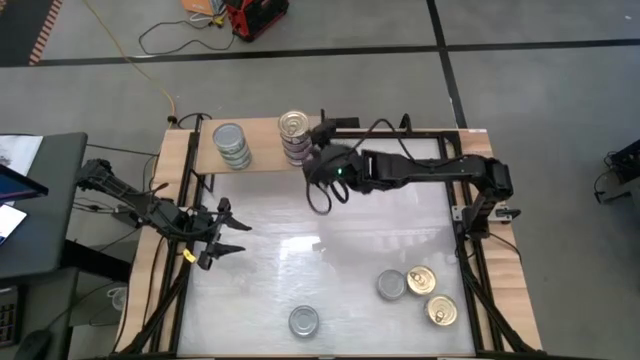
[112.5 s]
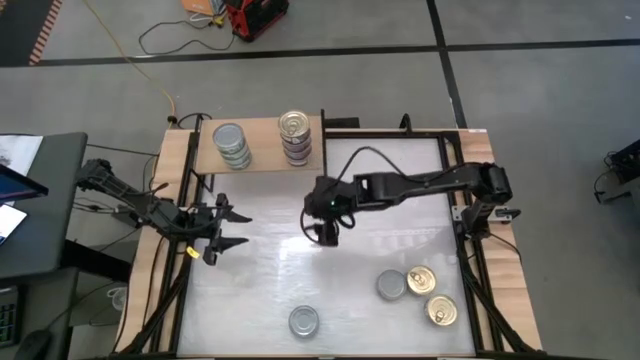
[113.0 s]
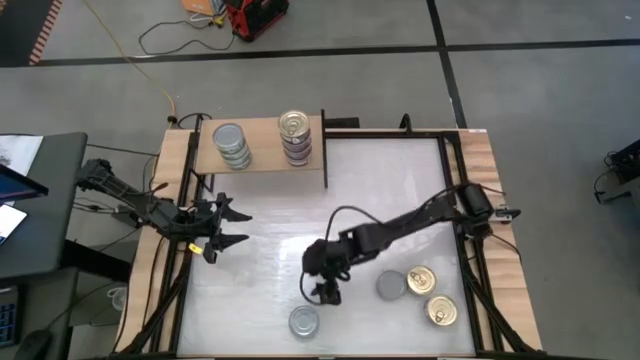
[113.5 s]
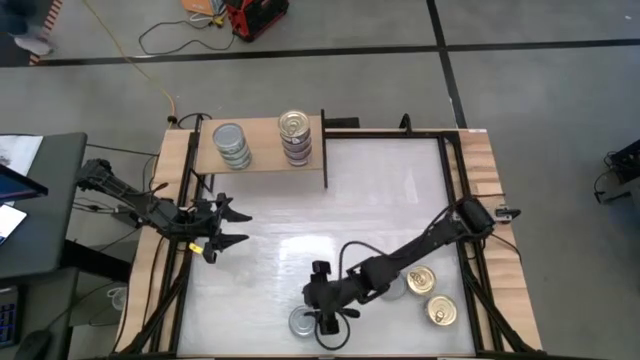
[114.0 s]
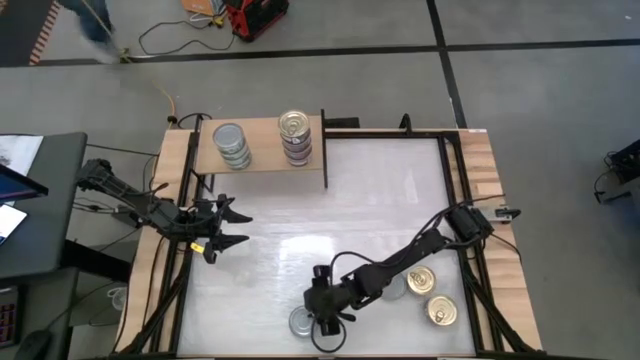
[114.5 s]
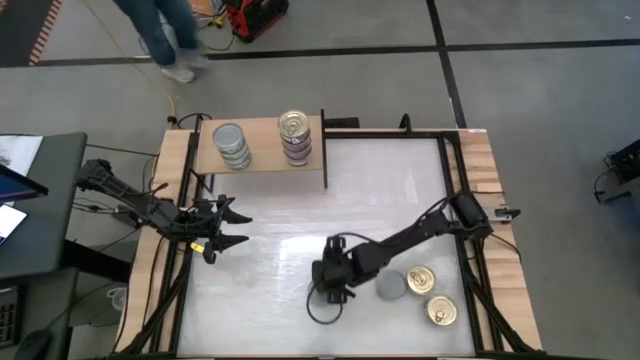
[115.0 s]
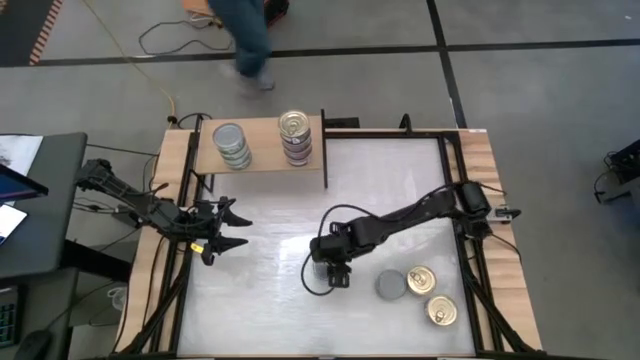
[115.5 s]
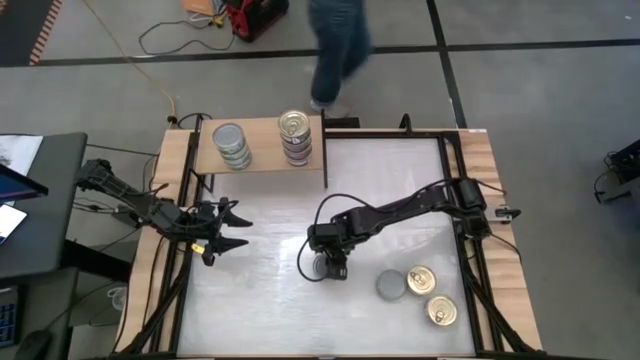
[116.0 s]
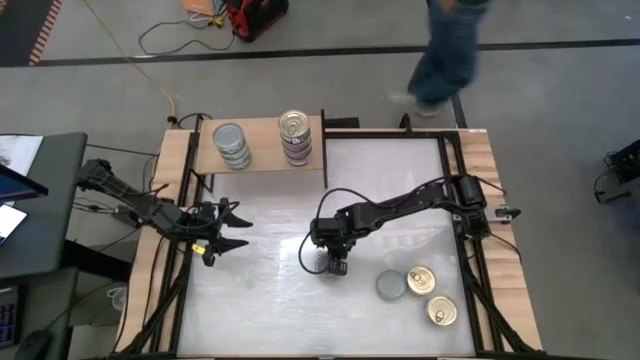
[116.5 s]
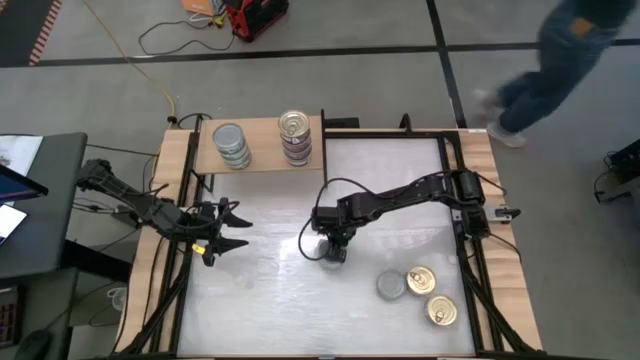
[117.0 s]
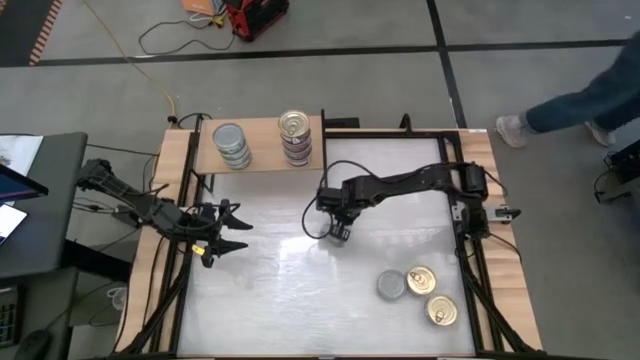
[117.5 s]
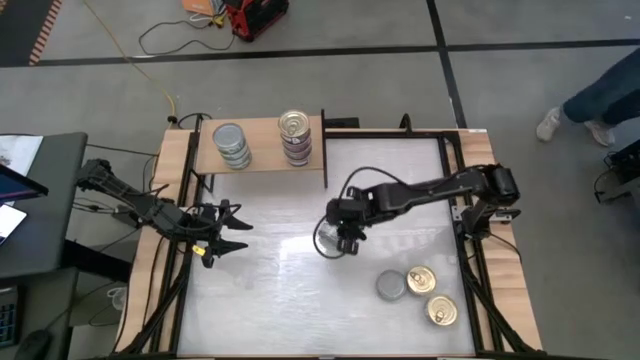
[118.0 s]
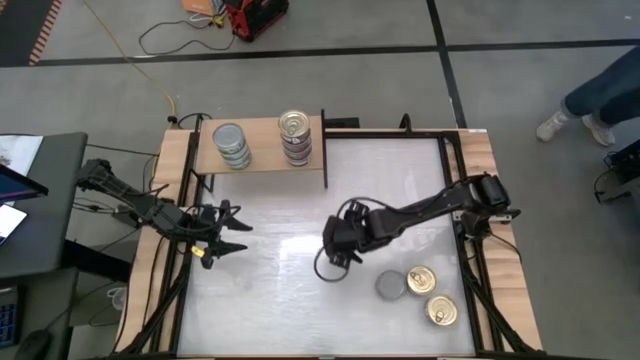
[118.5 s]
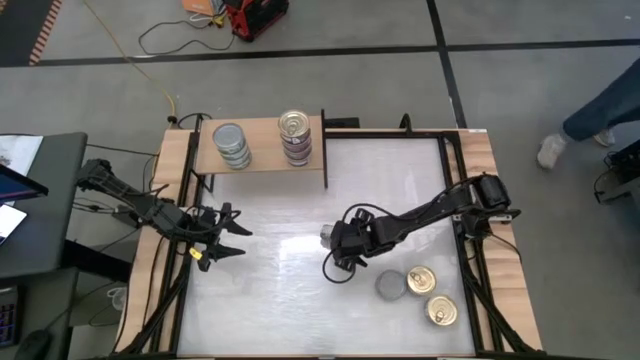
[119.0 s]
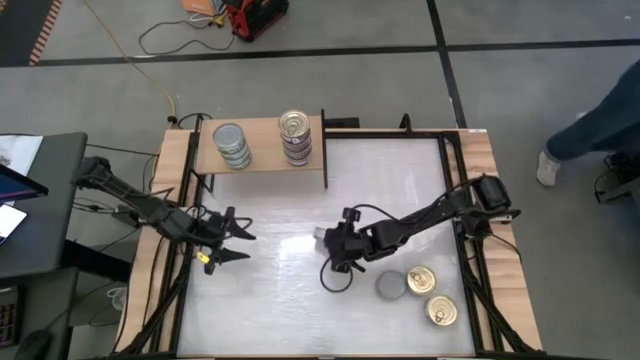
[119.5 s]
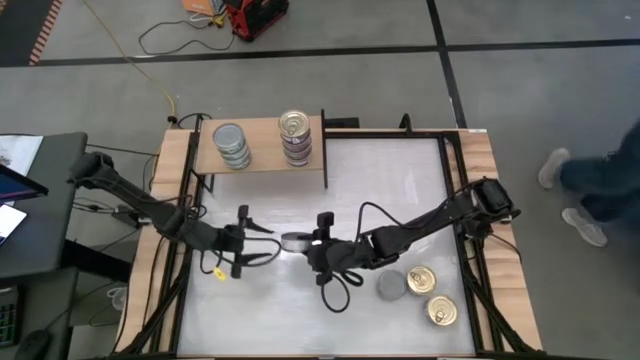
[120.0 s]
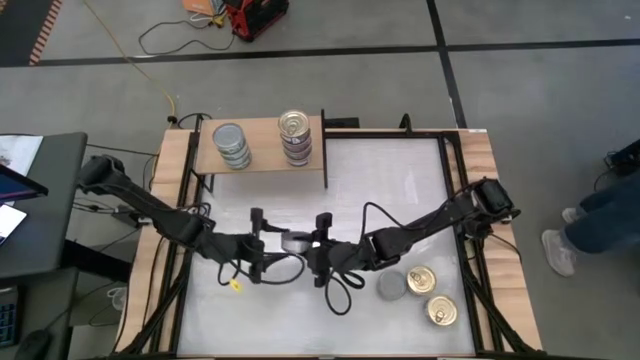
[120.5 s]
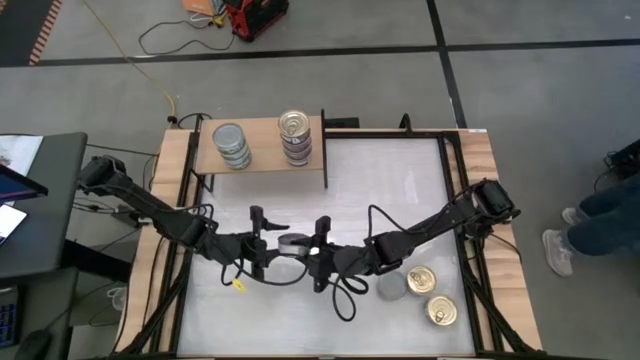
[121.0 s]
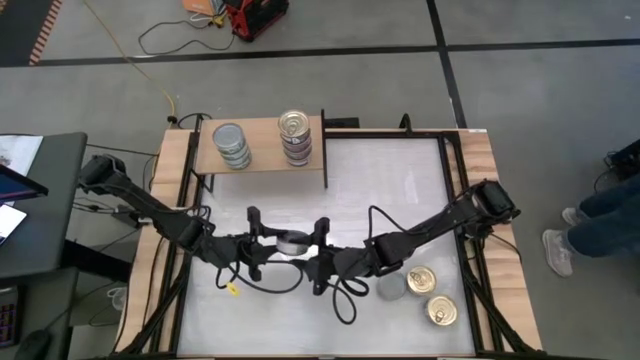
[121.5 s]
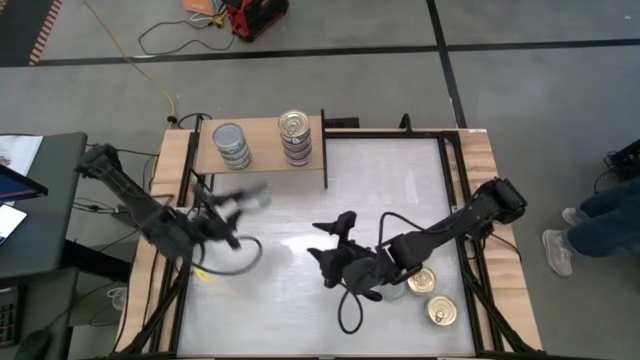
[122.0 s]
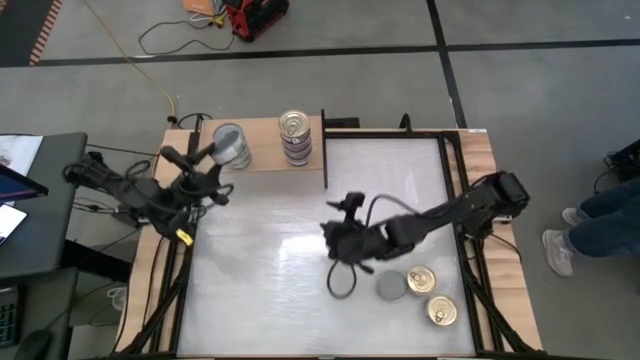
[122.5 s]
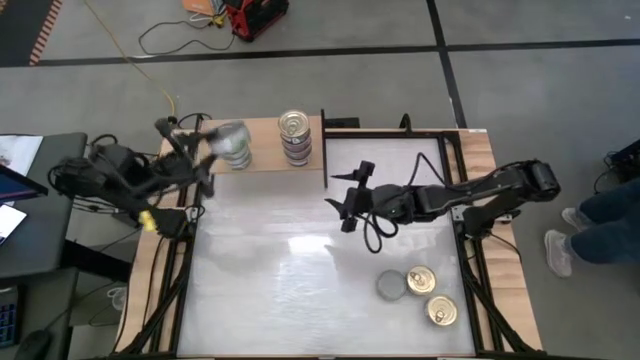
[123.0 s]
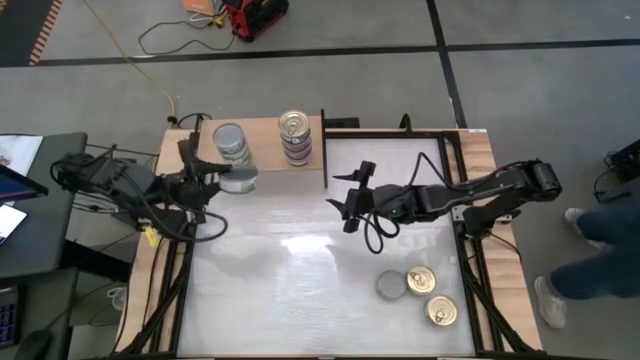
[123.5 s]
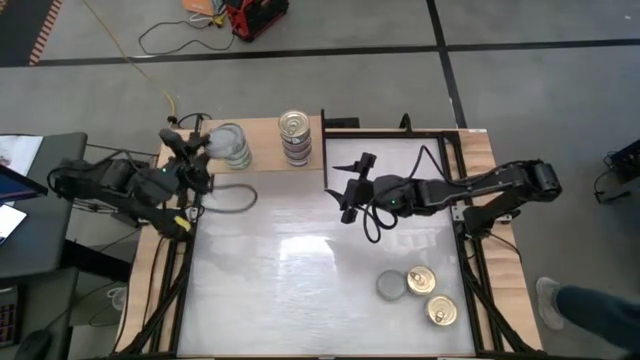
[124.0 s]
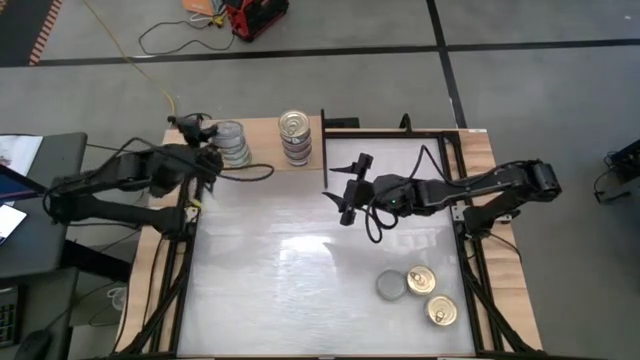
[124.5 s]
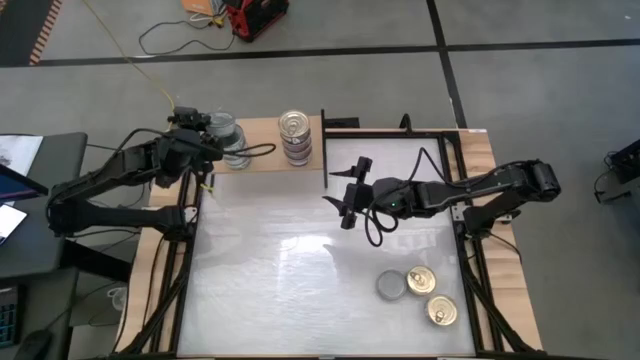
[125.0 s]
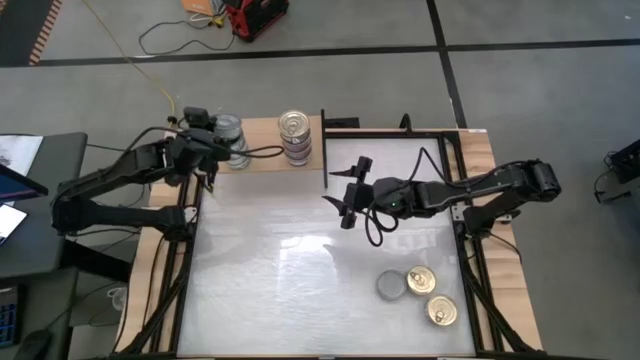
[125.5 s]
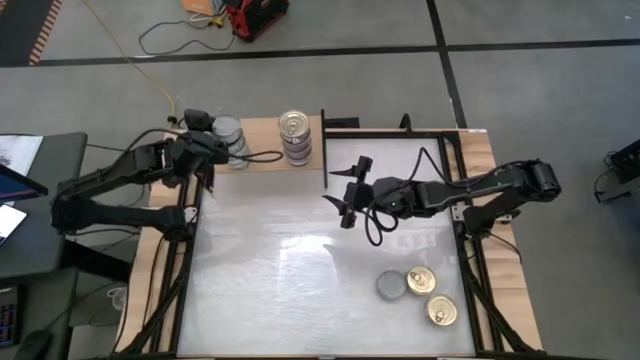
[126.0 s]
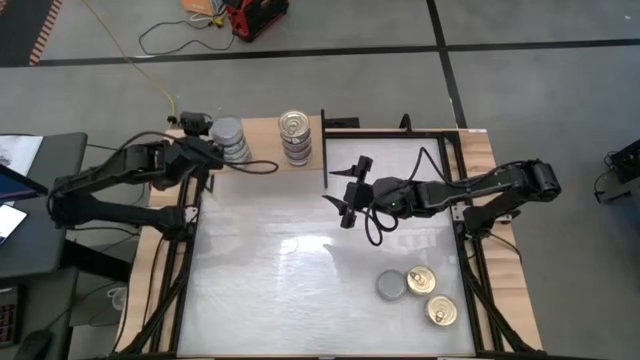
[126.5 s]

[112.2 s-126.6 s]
Task: Stack canned seafood by type on shelf
Stack the green-white tuna can on top of the other green-white tuna cans on the shelf

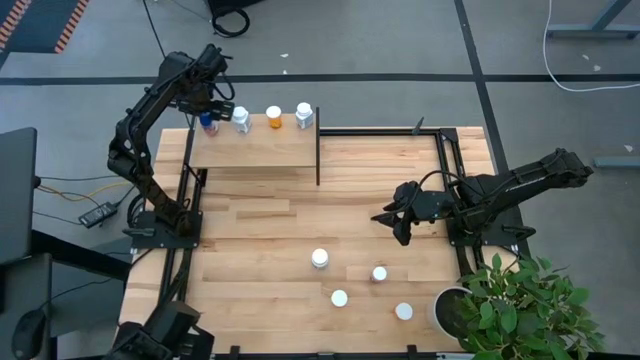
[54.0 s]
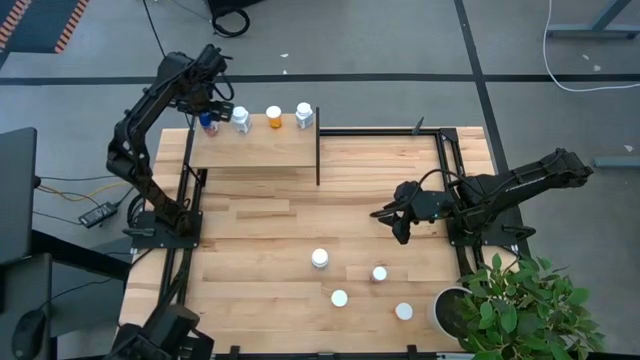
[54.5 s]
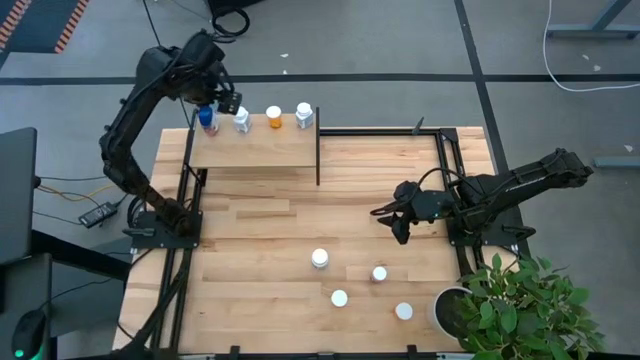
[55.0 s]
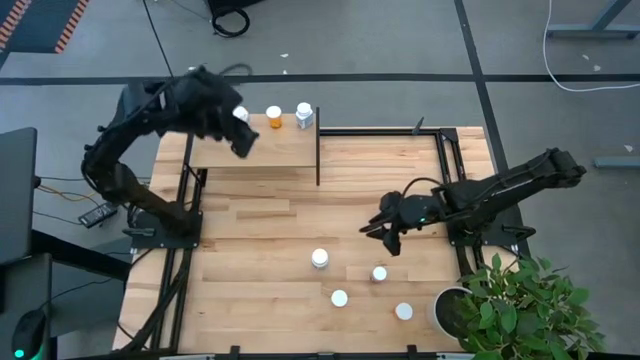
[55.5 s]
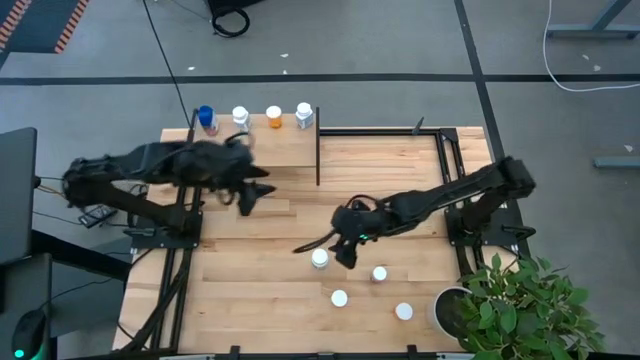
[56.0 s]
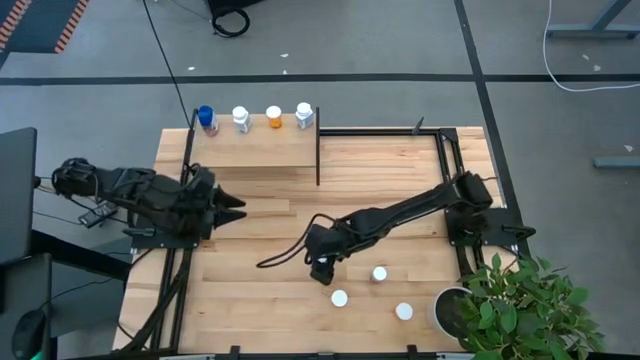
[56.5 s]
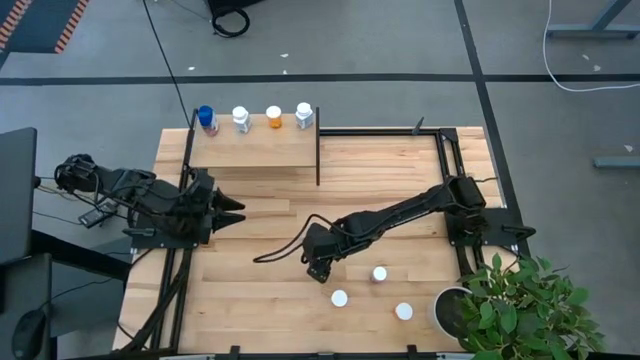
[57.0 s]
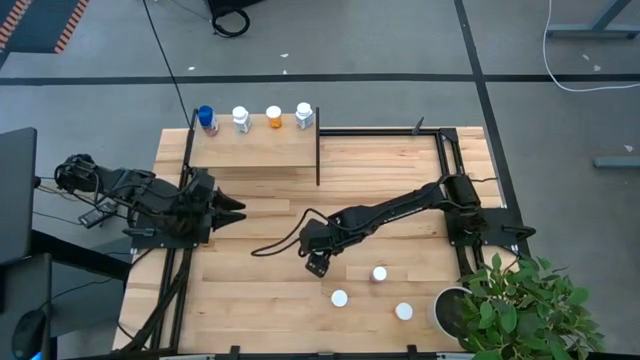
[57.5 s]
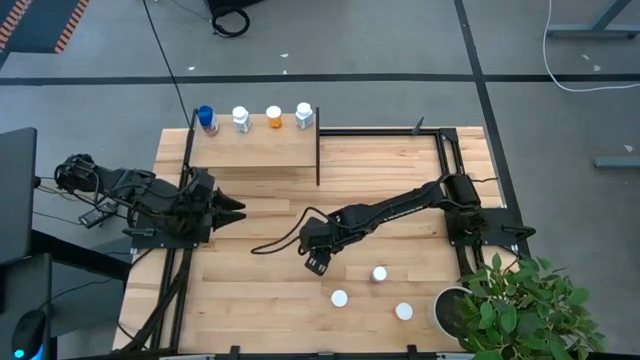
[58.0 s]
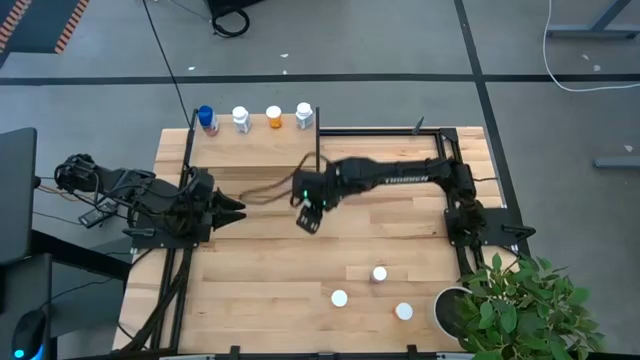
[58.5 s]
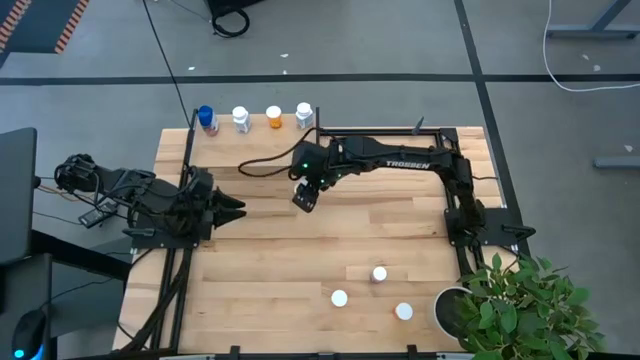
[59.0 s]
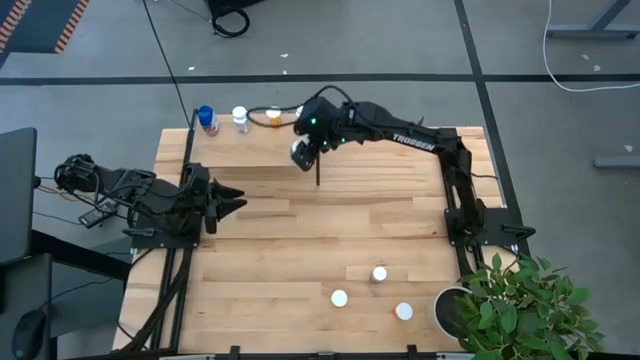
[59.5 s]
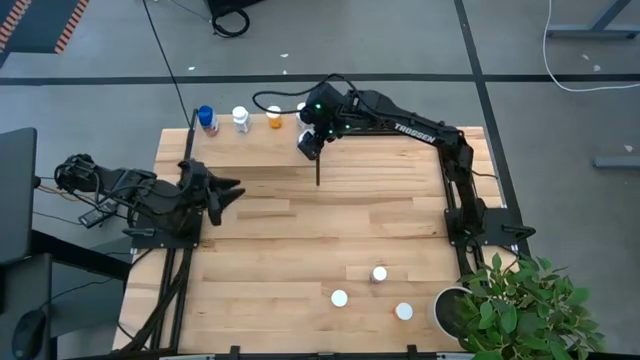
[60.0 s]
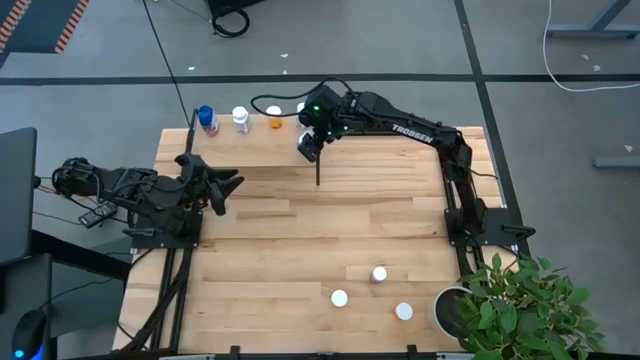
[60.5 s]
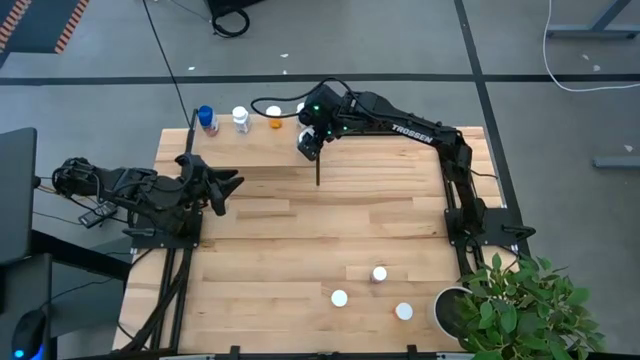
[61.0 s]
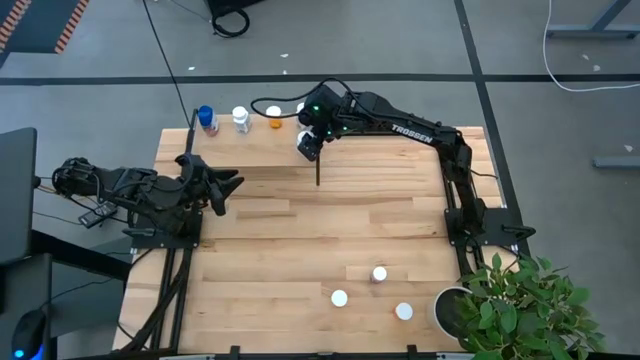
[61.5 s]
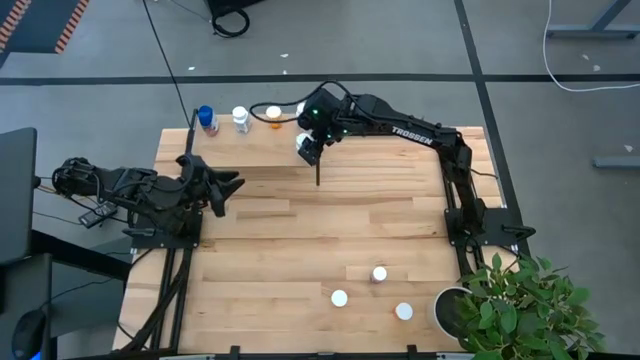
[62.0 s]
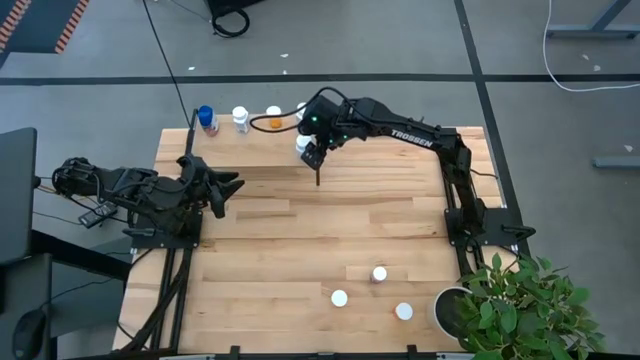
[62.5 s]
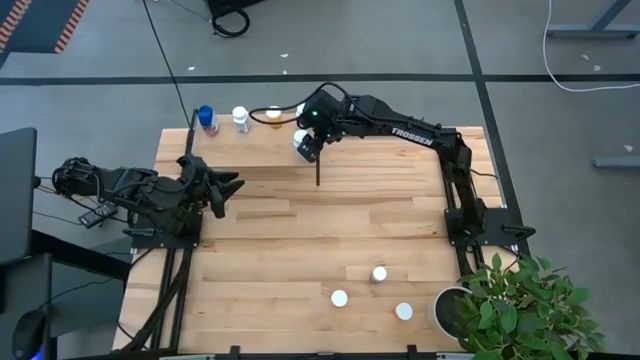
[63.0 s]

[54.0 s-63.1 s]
Task: Pick and place medicine bottles onto shelf by color
Put the white and green pill bottle on the shelf
